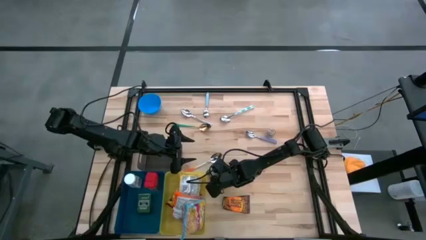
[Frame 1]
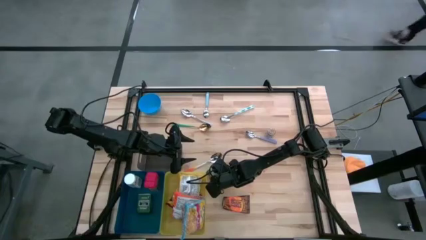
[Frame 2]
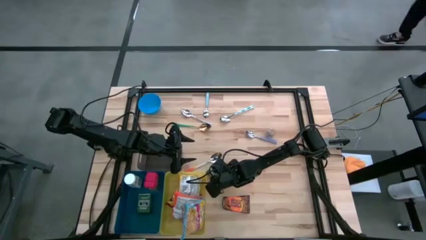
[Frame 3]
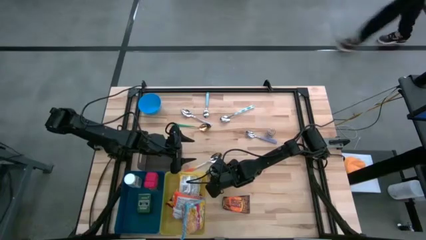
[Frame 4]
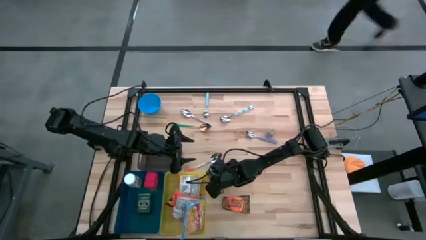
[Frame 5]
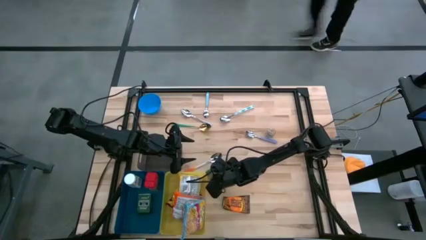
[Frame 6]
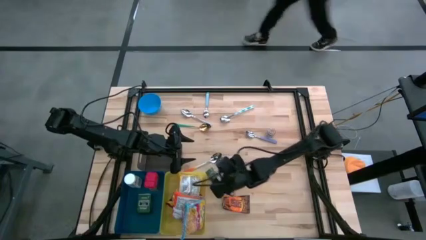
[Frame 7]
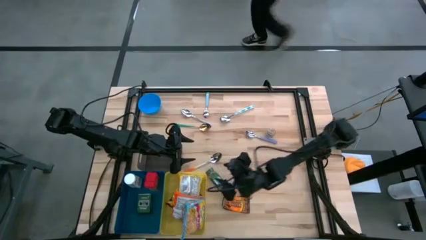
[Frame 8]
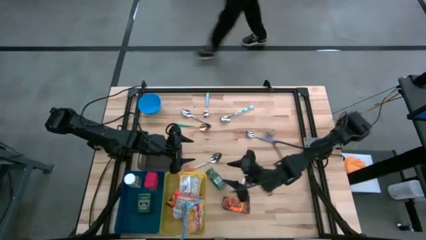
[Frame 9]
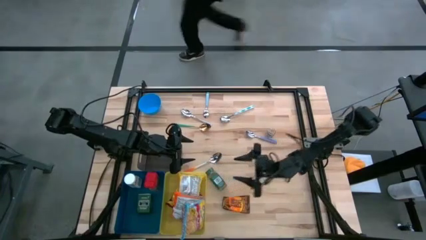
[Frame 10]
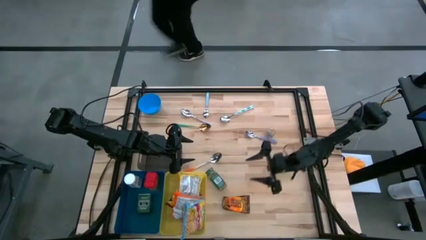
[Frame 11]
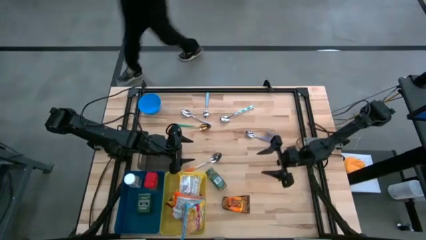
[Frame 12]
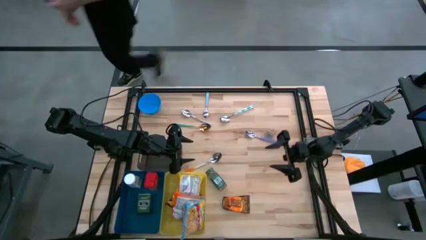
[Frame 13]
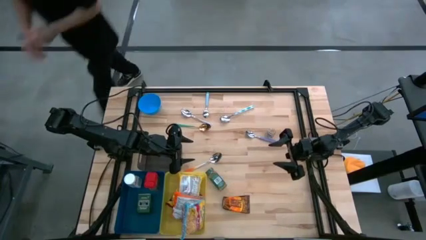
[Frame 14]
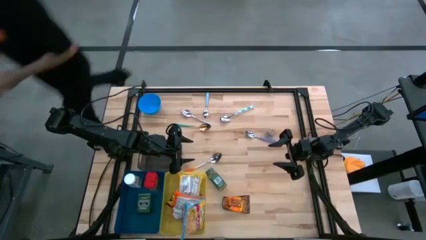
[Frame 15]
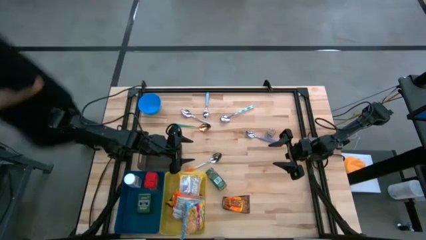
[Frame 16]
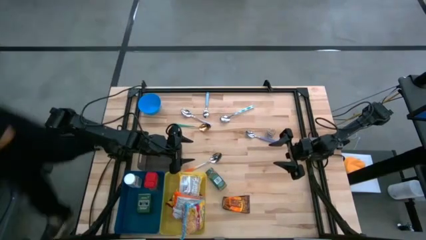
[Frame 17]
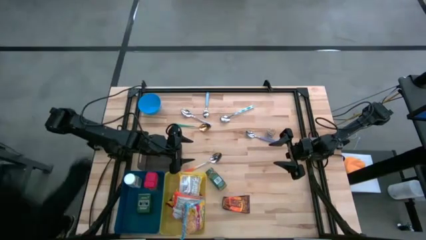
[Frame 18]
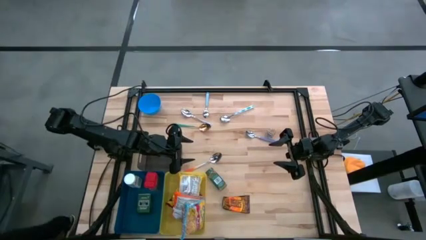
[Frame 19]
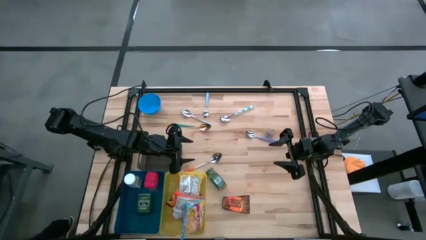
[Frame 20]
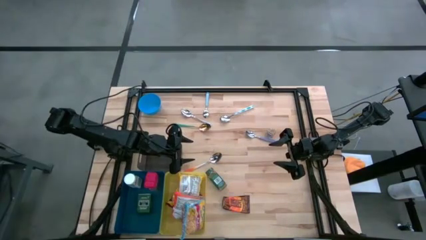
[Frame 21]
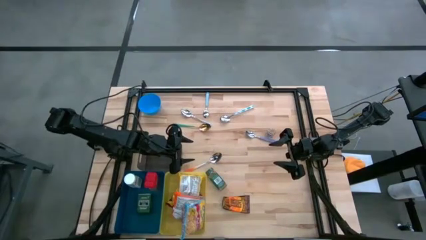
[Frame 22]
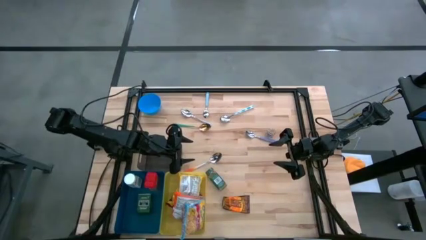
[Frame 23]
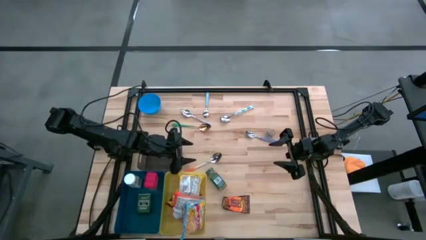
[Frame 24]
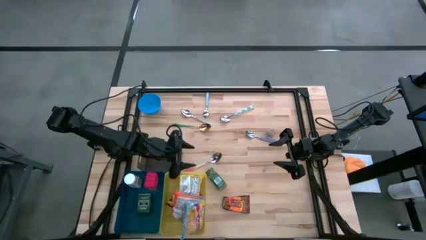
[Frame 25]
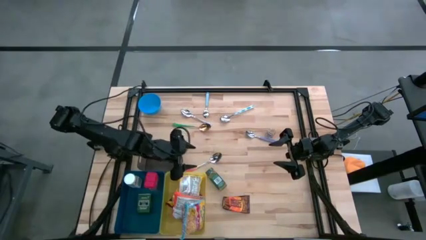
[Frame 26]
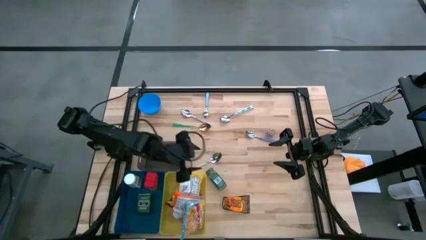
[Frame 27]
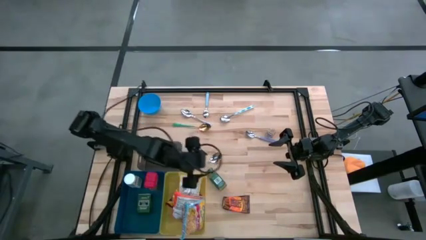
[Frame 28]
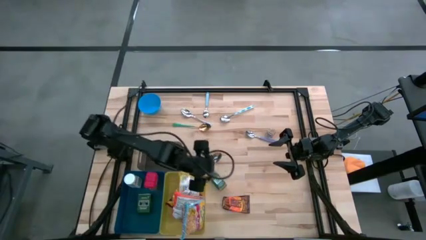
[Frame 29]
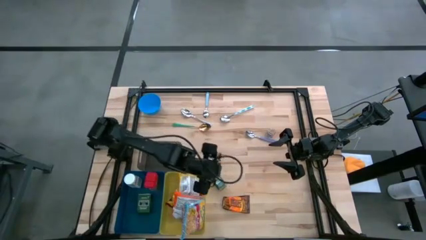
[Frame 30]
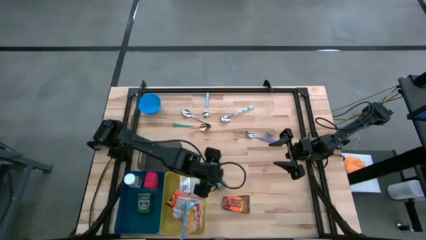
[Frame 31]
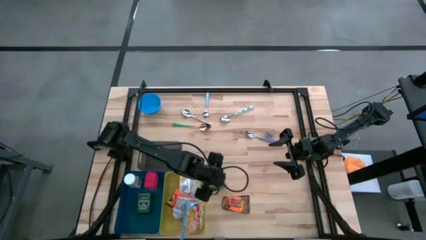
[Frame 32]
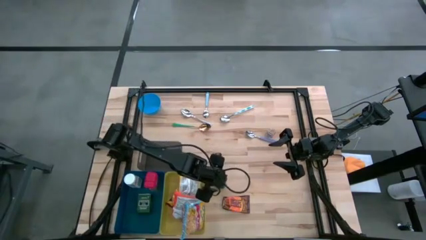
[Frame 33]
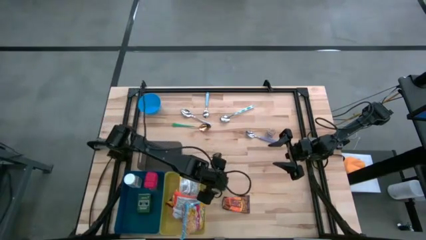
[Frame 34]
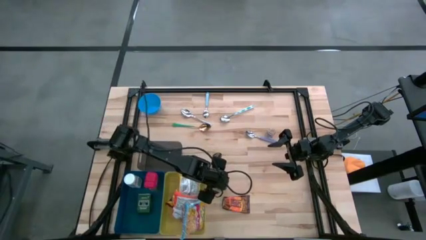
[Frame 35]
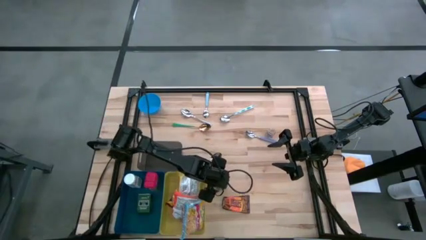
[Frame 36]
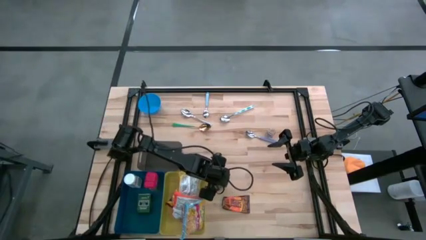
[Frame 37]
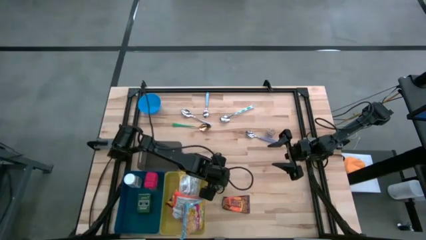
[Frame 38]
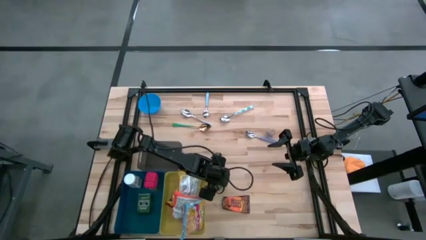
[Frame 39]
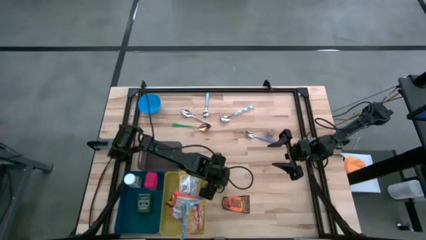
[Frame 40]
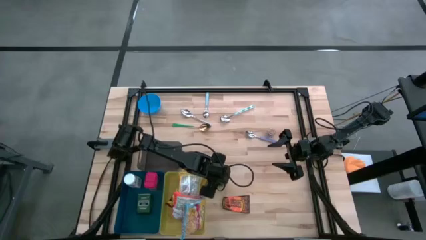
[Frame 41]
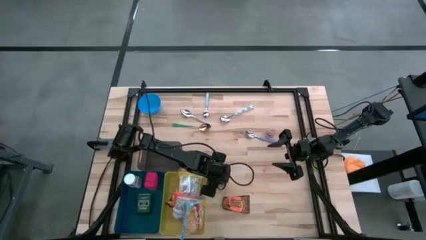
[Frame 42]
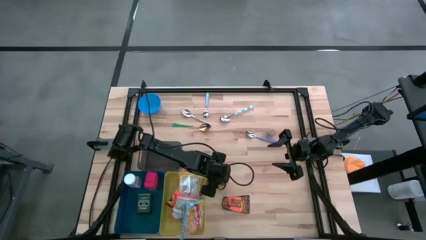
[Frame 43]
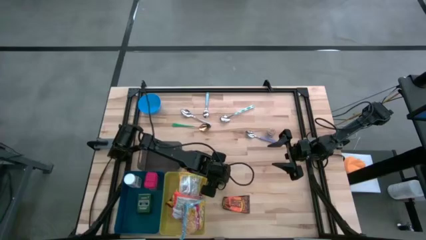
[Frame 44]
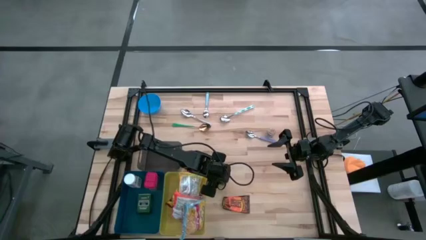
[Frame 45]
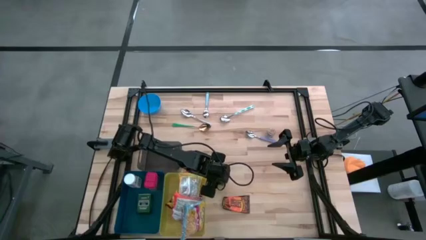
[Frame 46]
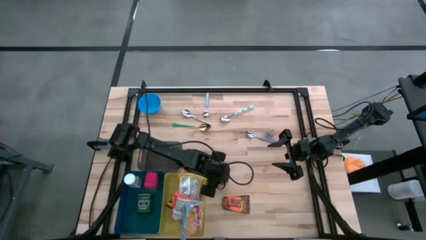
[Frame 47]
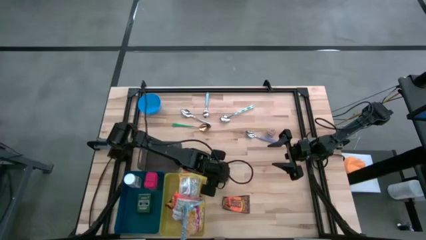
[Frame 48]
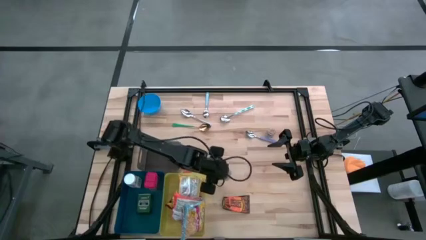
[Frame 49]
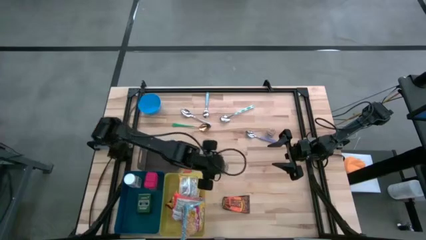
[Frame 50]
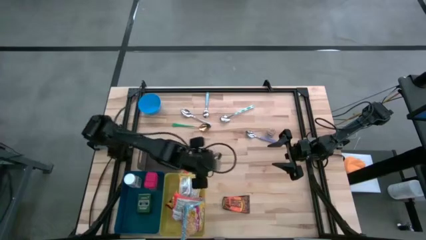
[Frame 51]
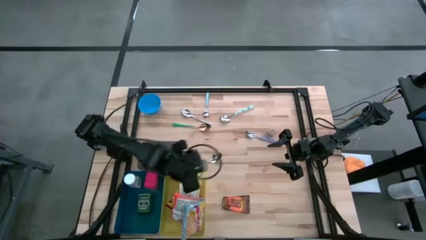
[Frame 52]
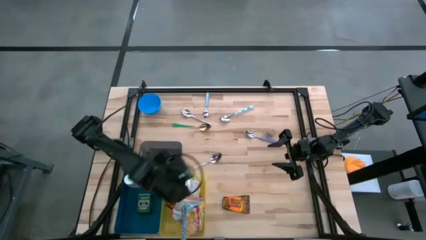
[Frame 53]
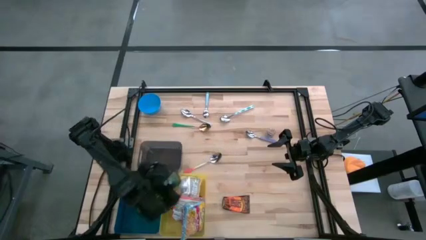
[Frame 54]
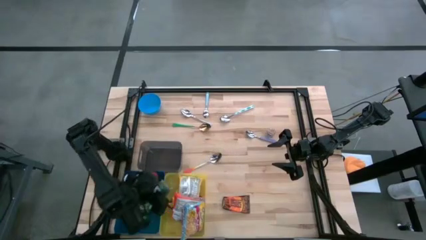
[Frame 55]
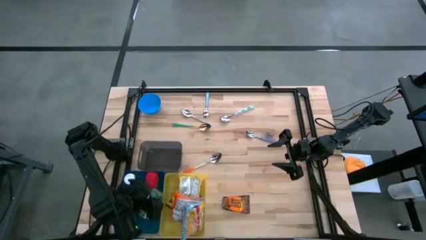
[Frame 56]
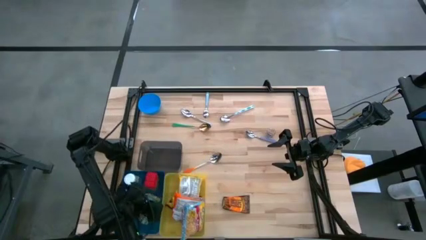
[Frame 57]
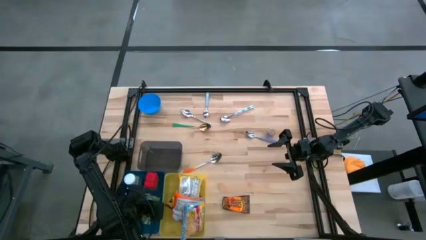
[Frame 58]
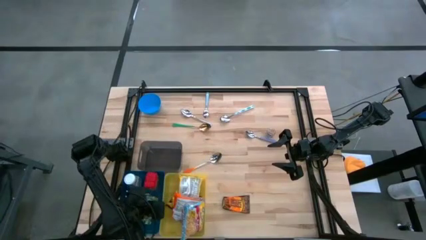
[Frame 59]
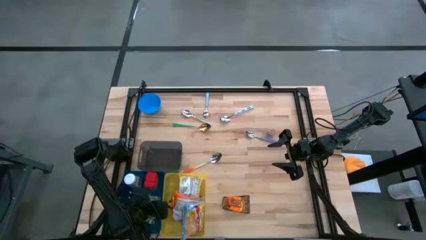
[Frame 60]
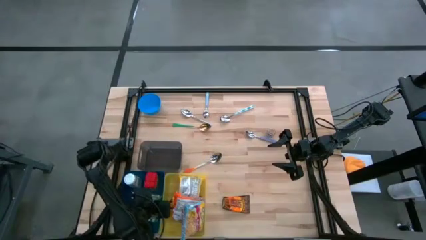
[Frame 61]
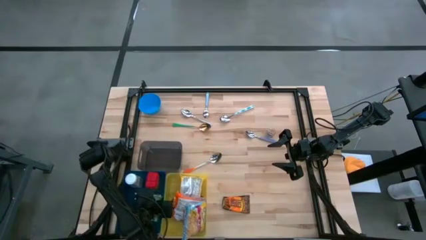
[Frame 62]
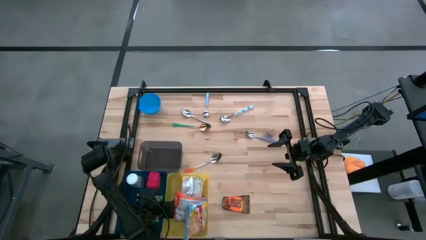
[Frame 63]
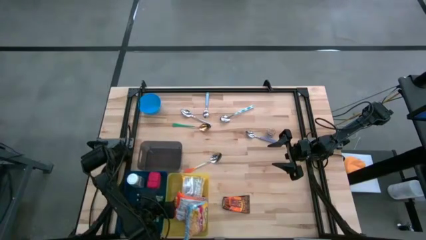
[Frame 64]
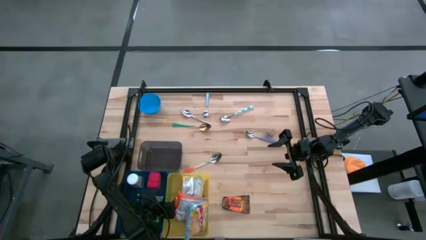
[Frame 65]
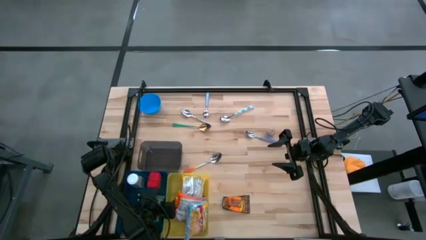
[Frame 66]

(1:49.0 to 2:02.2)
Put the green seasoning bottle into the blue bin
